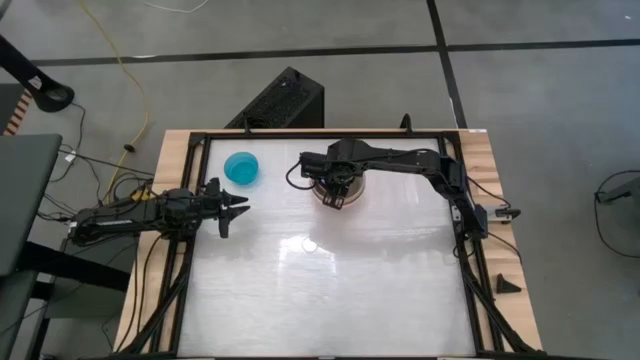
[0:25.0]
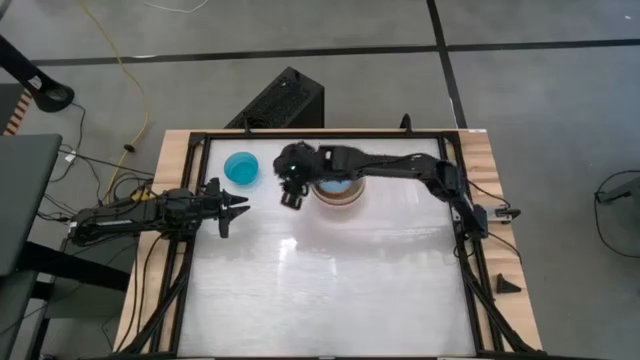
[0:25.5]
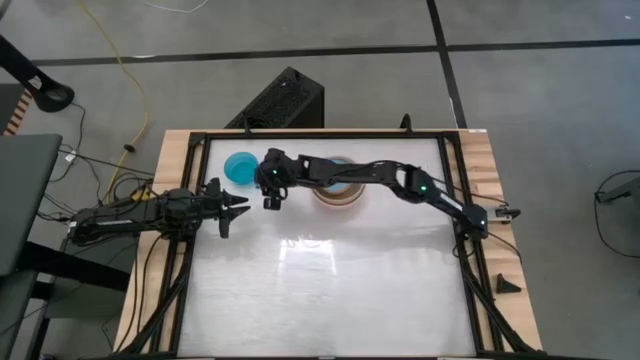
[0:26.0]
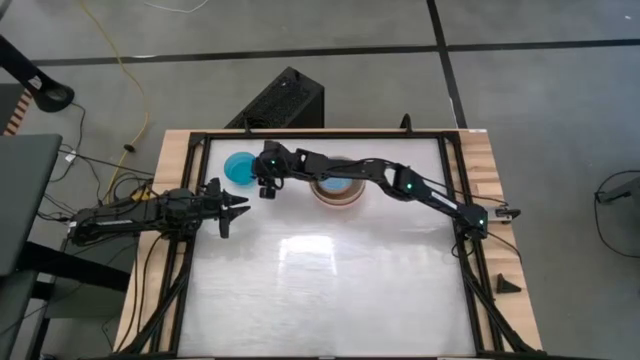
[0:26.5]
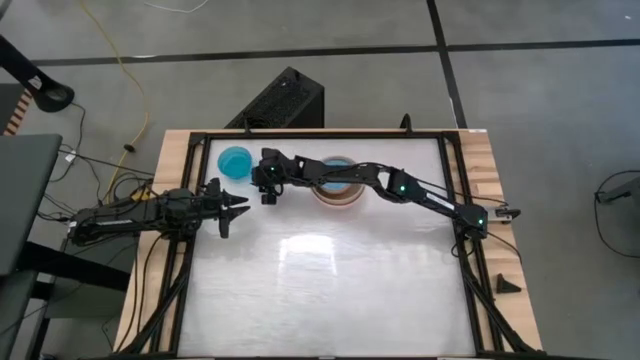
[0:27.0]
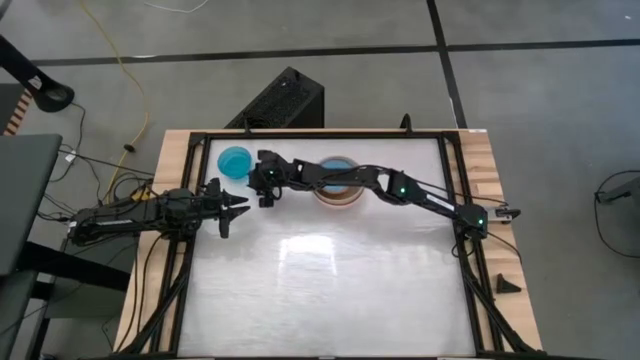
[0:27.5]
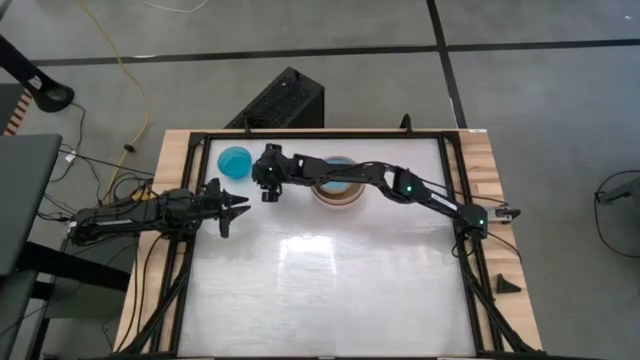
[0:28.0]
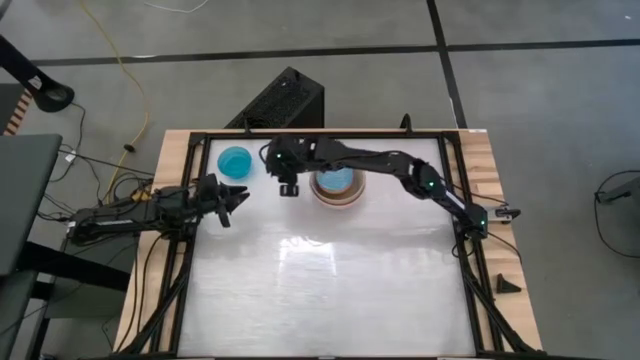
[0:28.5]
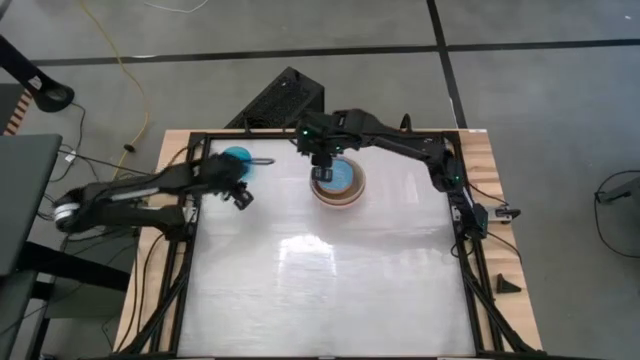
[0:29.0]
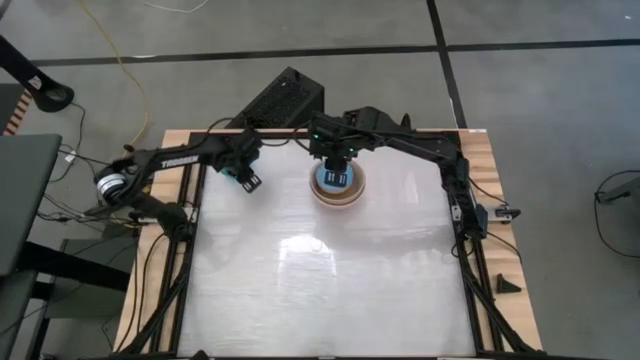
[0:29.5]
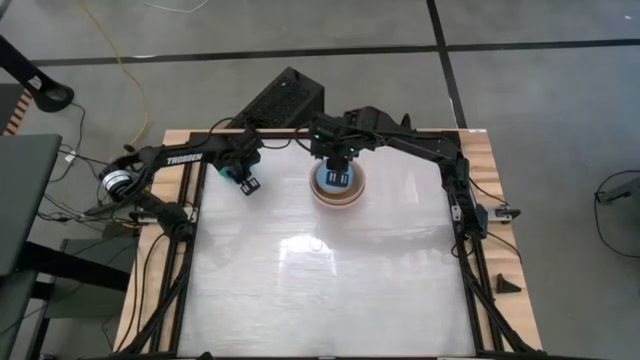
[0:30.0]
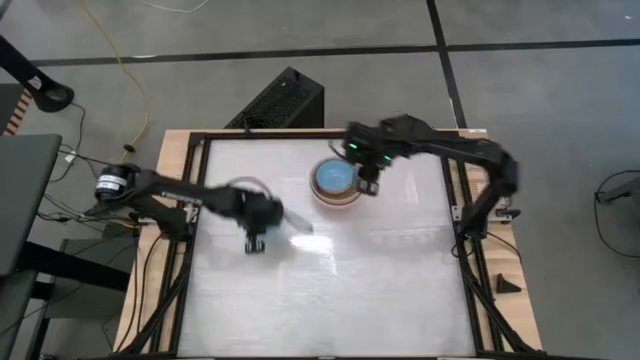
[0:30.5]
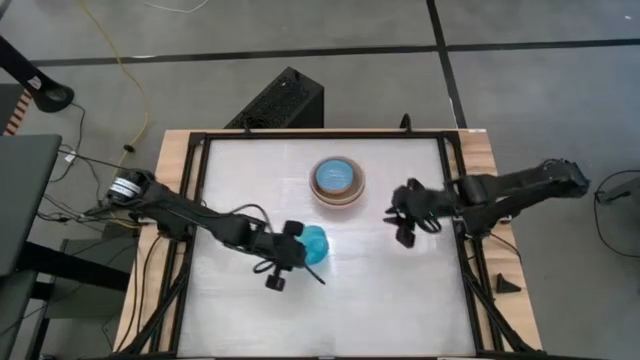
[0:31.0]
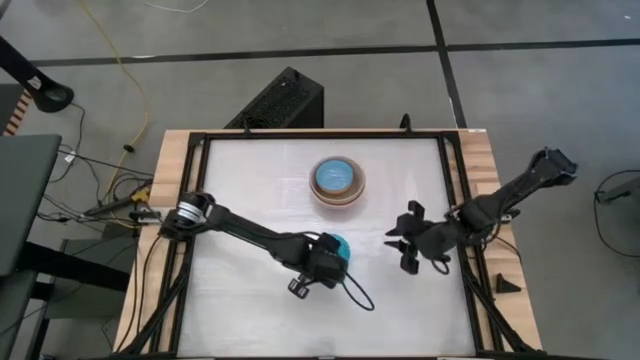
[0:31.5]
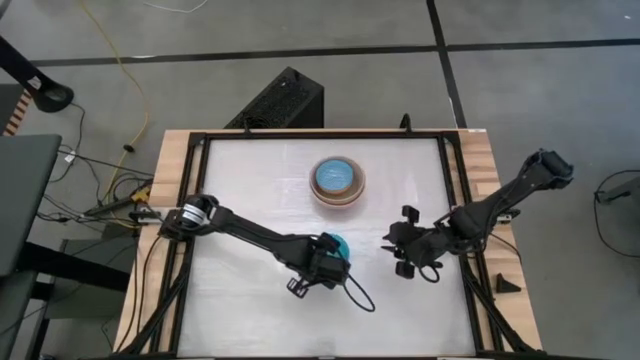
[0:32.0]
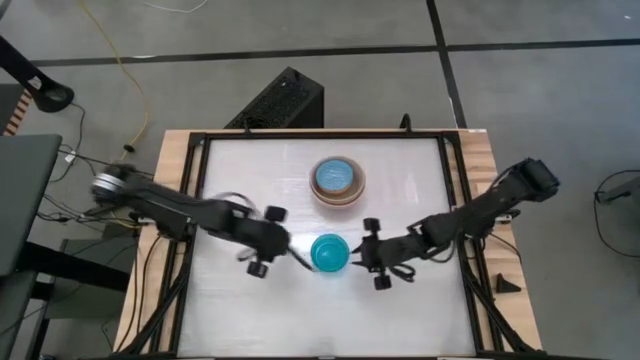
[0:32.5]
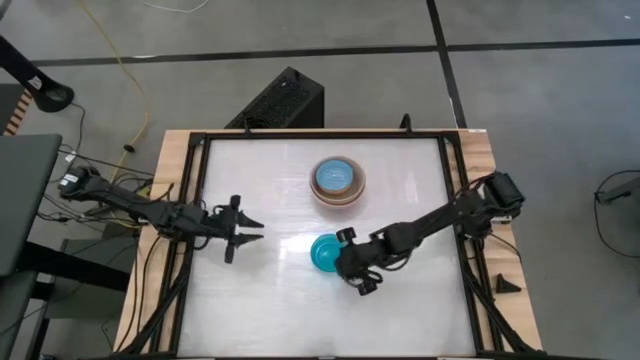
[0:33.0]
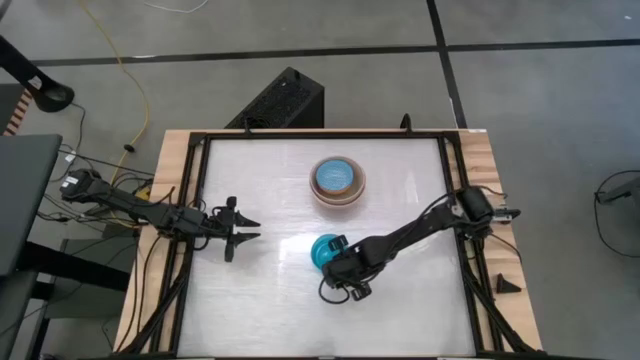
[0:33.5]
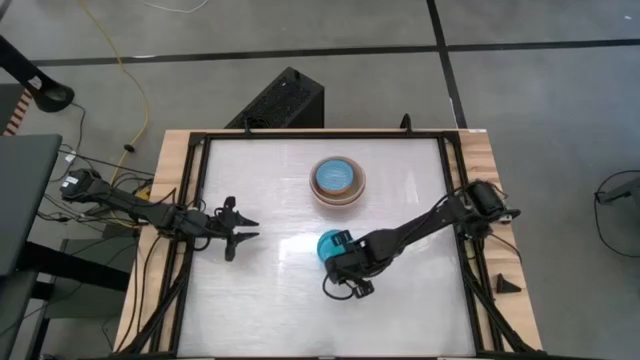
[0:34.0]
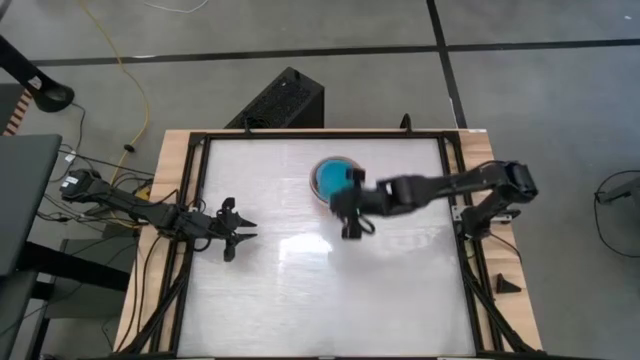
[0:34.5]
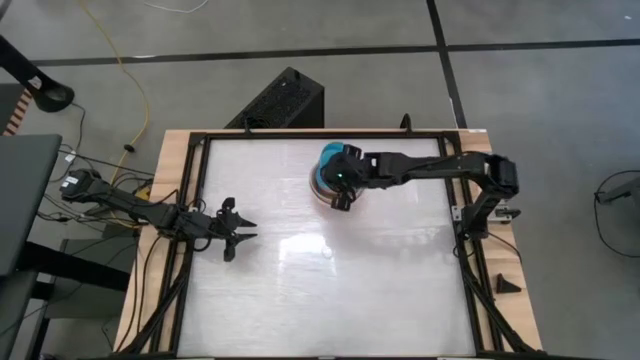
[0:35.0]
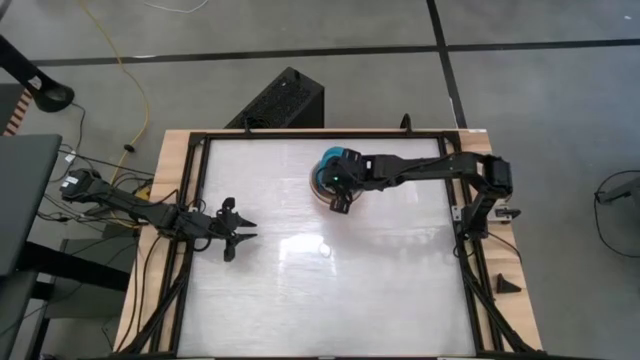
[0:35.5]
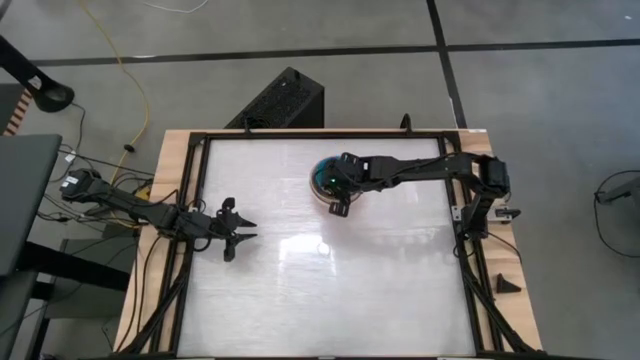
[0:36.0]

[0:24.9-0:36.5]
Stack the blue bowl on top of the blue patterned bowl

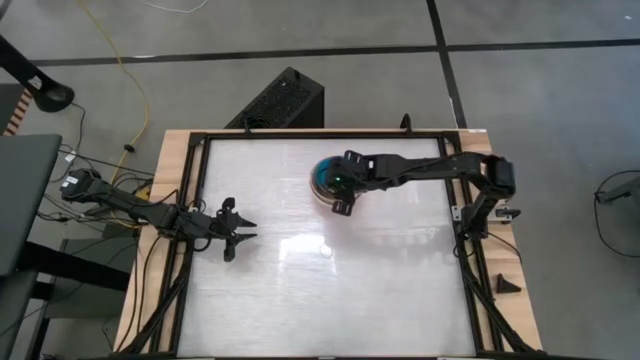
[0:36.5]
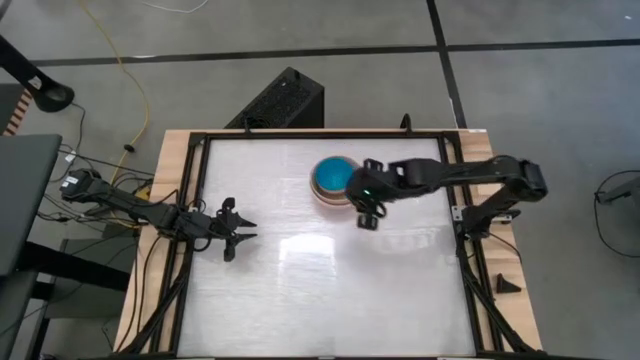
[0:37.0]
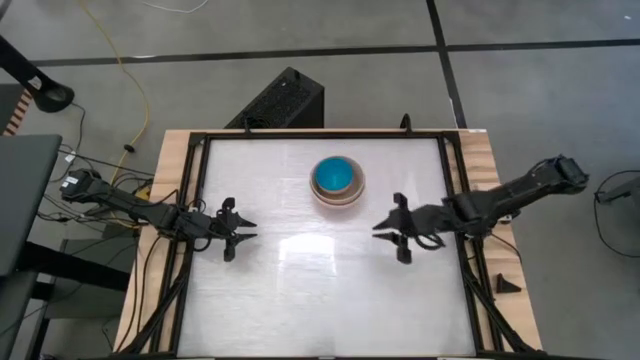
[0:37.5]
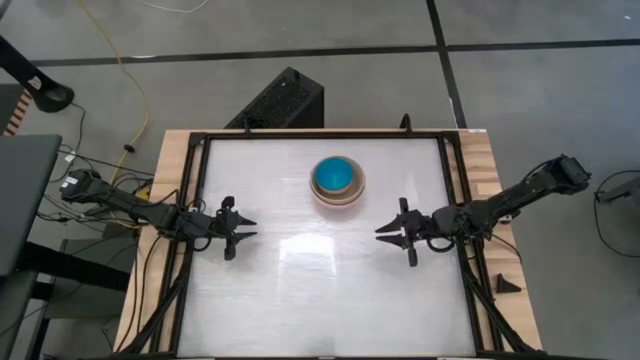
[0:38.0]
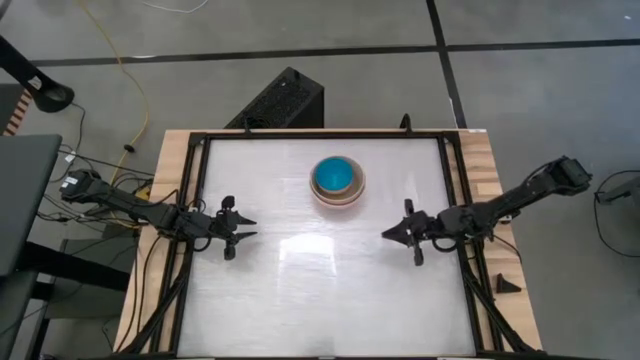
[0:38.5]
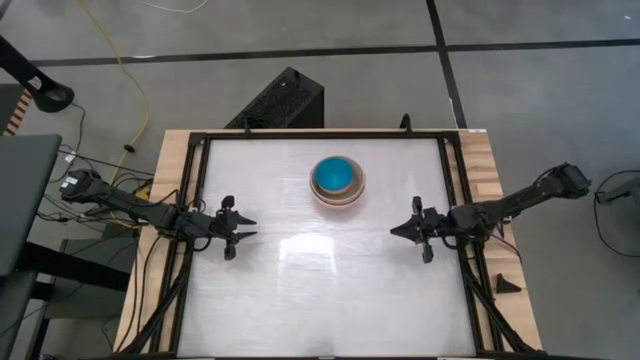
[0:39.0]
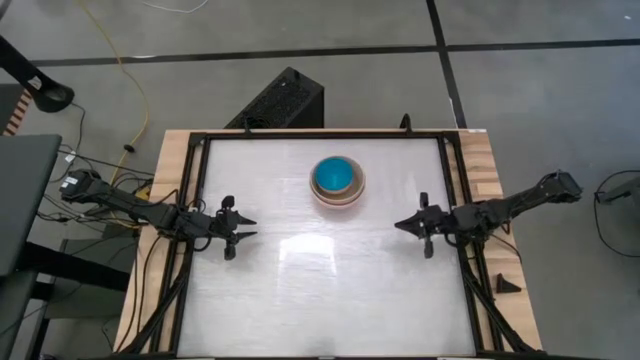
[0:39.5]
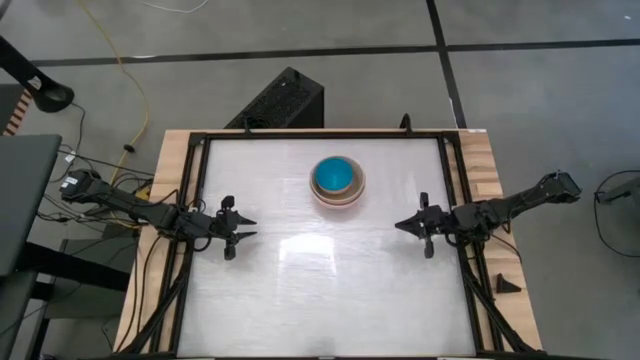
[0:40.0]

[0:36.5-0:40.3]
Return to Home Position

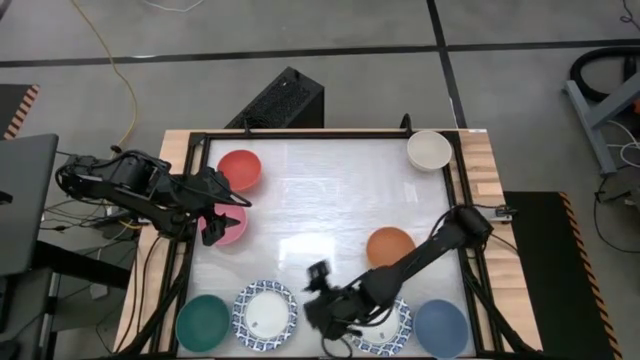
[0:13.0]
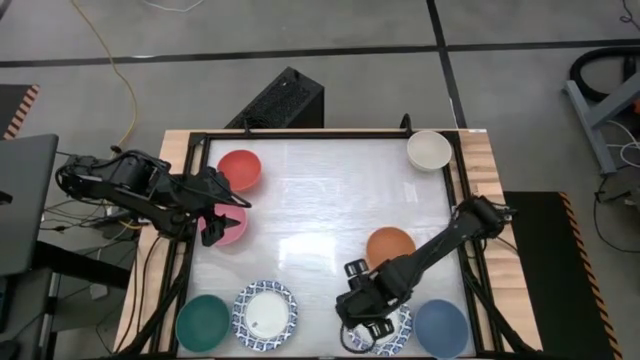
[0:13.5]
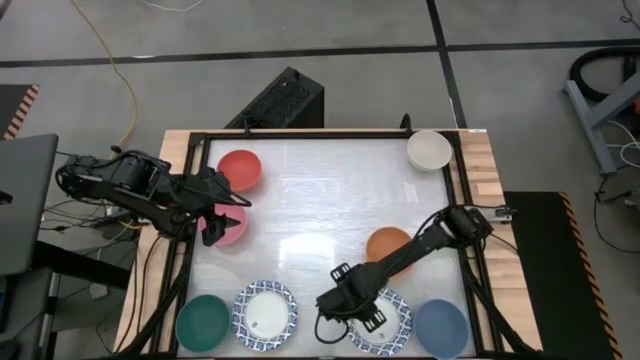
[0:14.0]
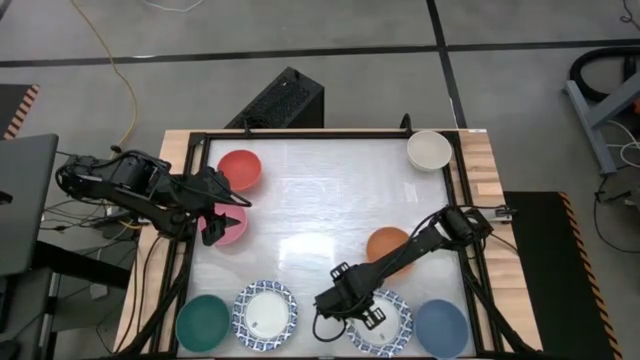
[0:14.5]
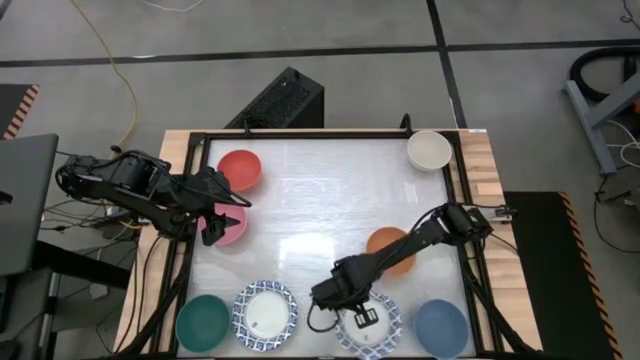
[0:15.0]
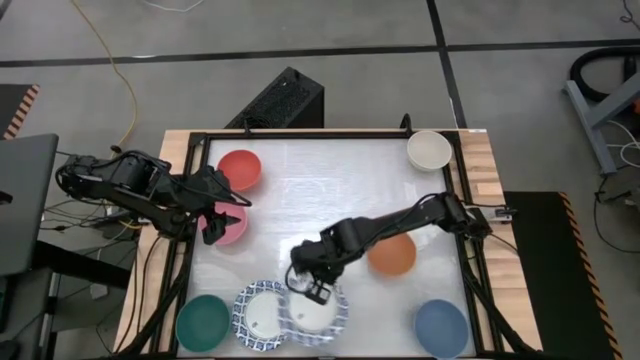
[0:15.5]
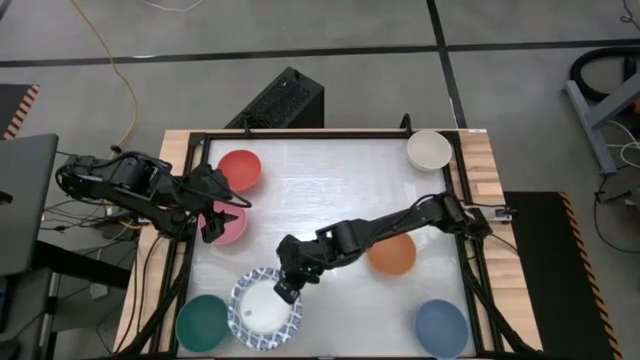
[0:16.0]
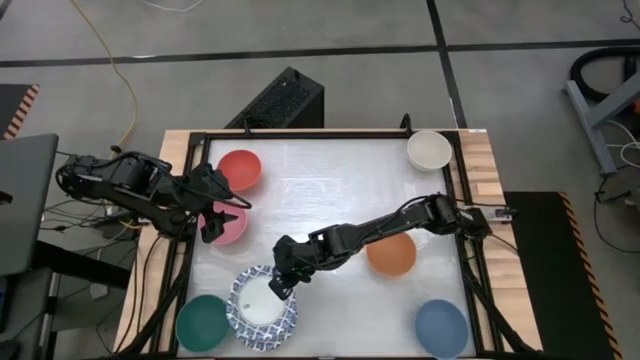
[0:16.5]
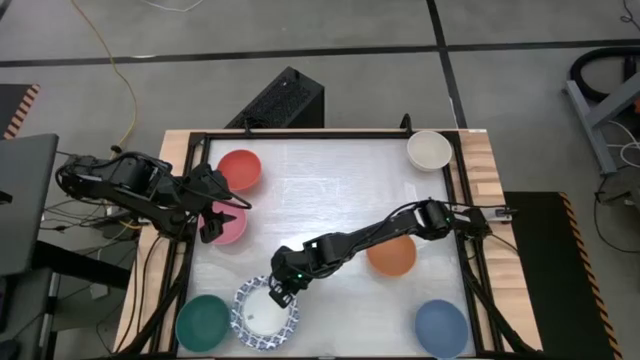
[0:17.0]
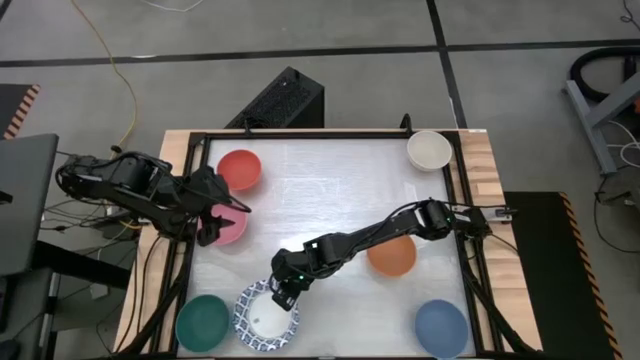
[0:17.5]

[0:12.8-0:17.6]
Stack the white striped bowl on the white striped bowl
